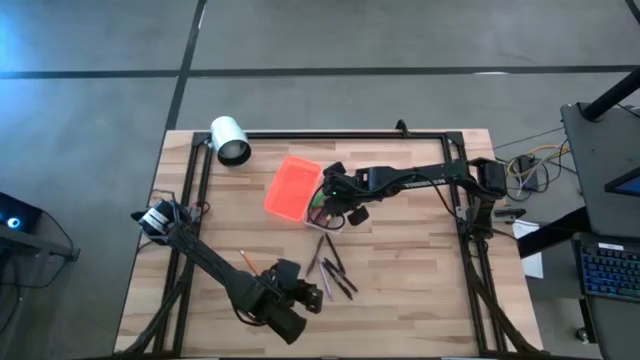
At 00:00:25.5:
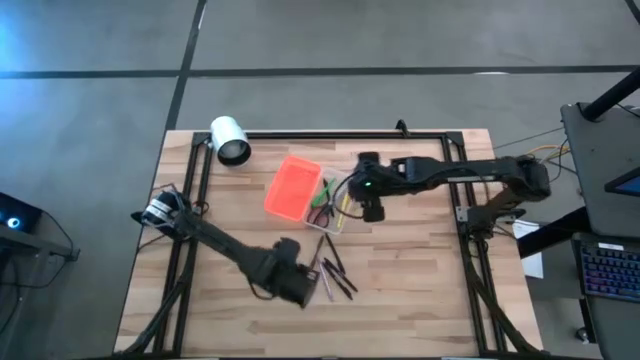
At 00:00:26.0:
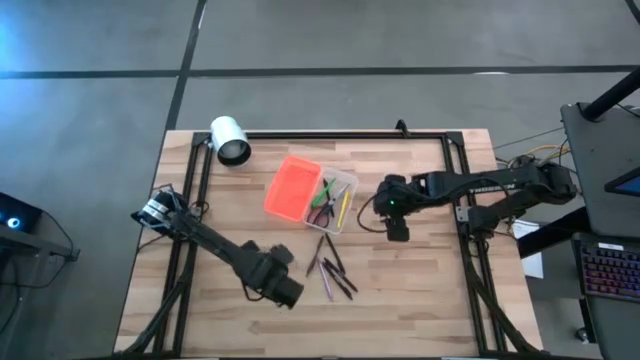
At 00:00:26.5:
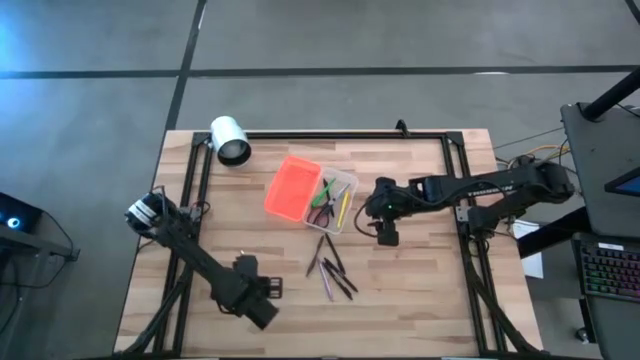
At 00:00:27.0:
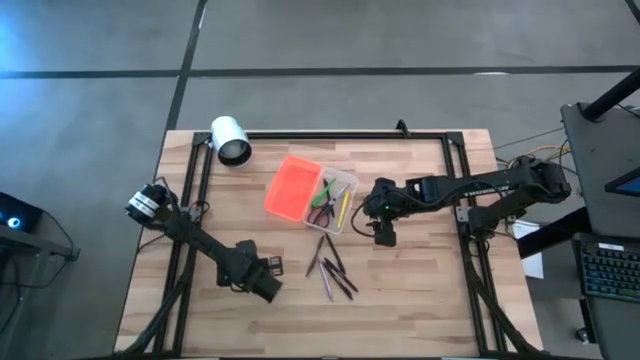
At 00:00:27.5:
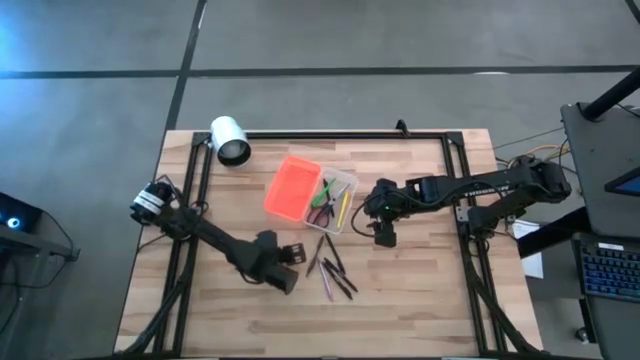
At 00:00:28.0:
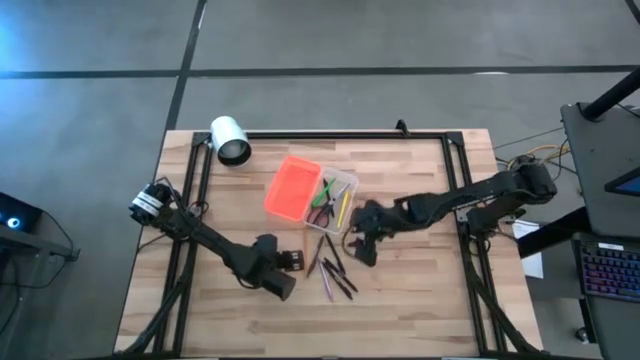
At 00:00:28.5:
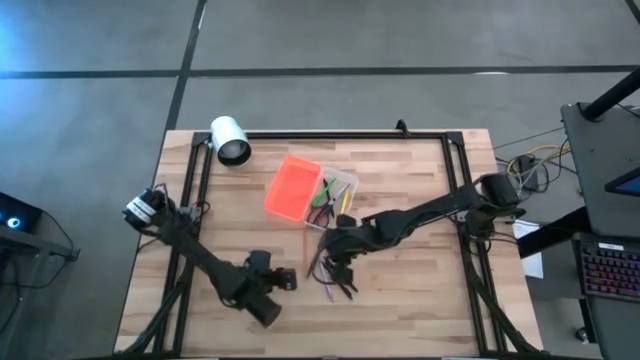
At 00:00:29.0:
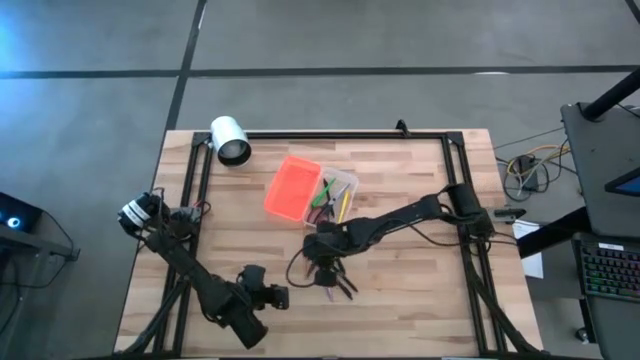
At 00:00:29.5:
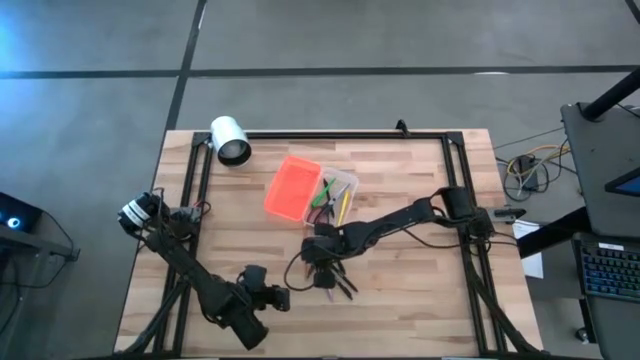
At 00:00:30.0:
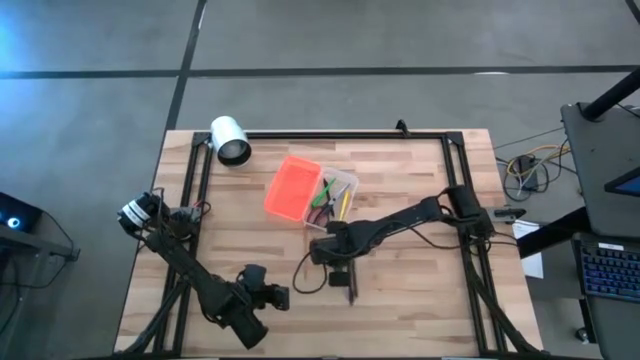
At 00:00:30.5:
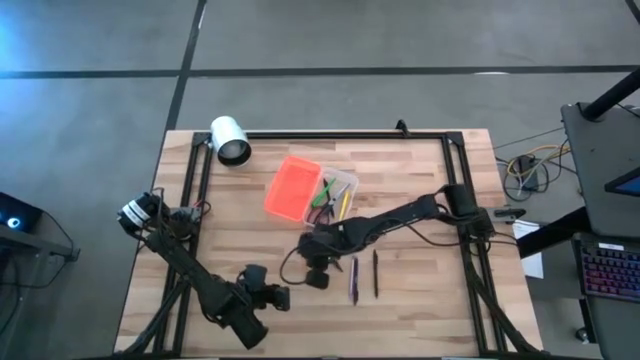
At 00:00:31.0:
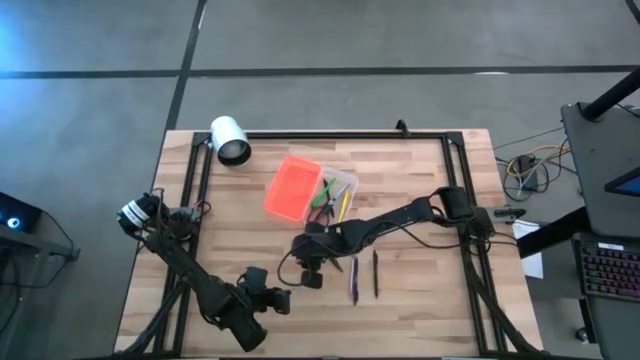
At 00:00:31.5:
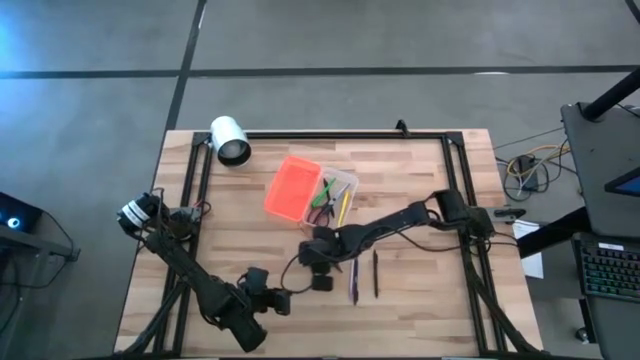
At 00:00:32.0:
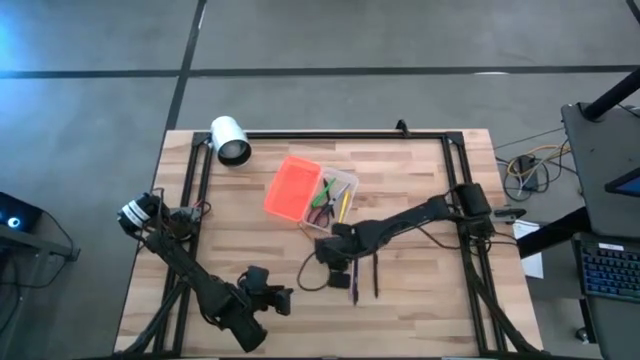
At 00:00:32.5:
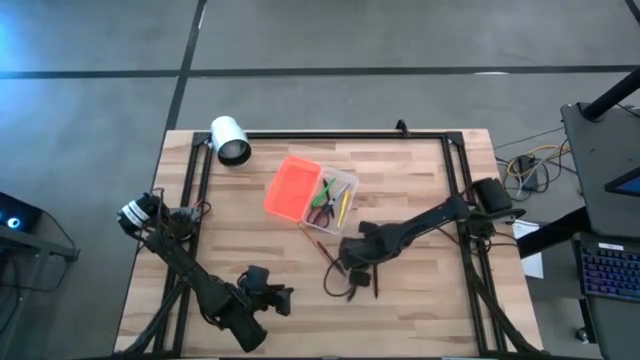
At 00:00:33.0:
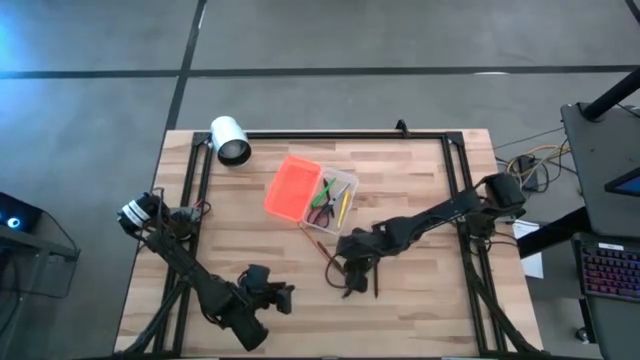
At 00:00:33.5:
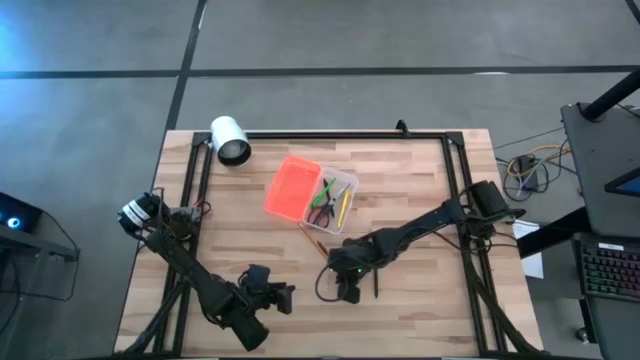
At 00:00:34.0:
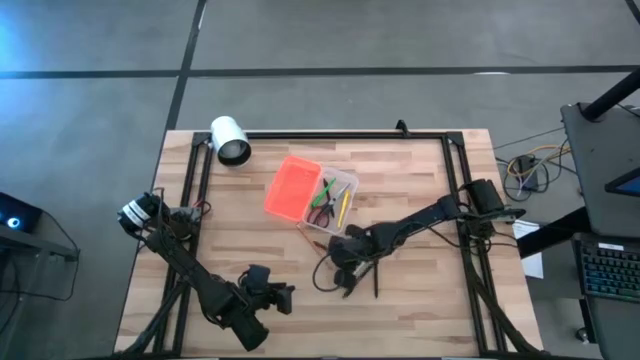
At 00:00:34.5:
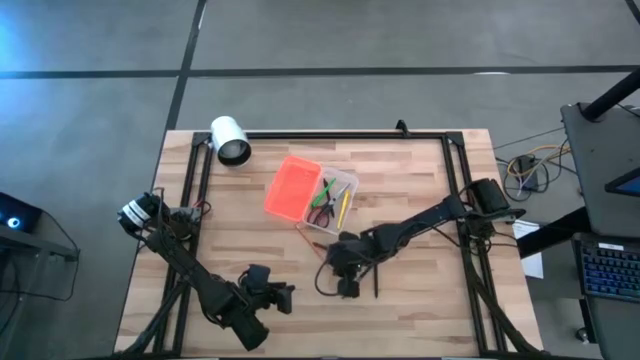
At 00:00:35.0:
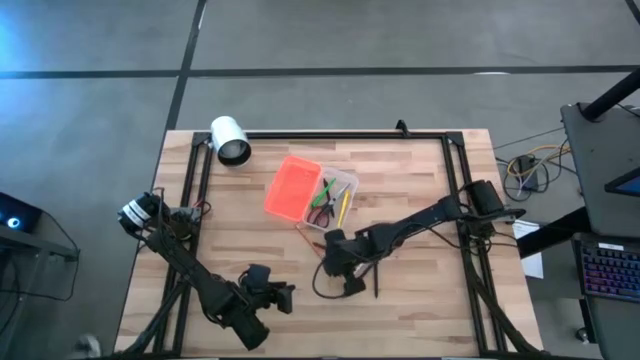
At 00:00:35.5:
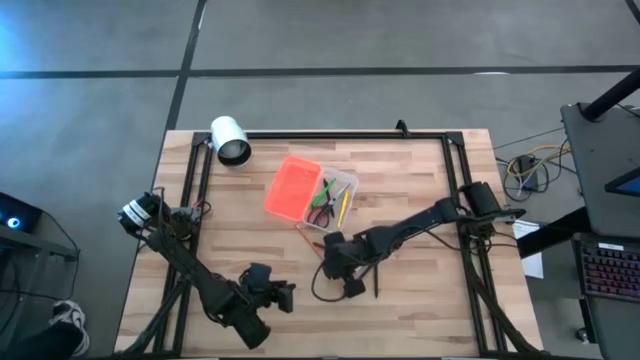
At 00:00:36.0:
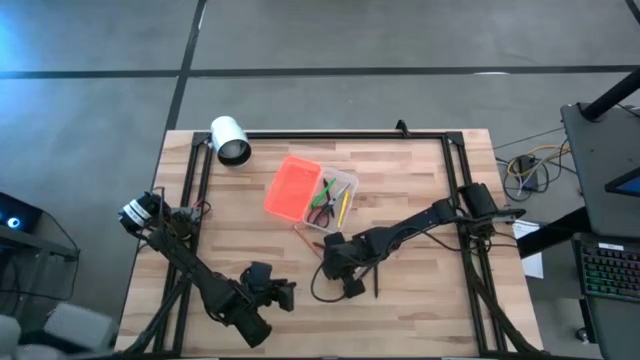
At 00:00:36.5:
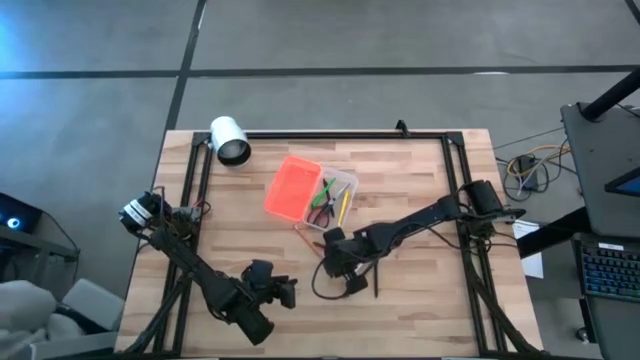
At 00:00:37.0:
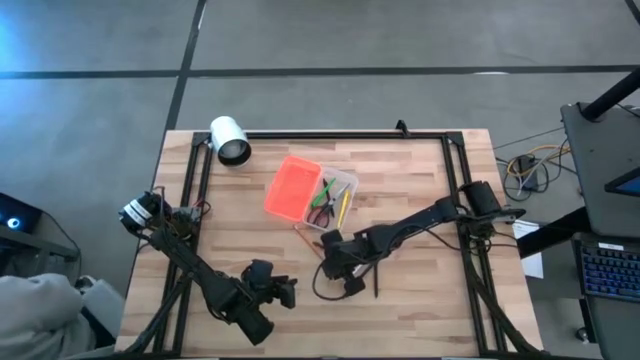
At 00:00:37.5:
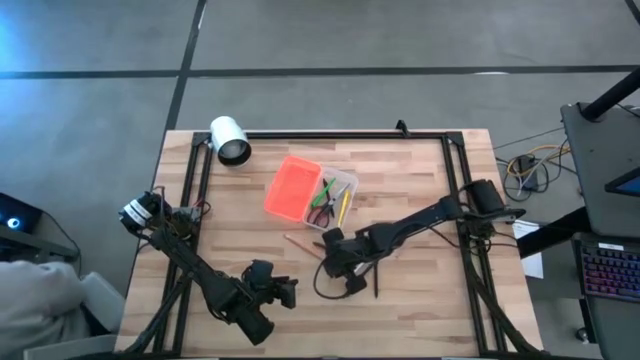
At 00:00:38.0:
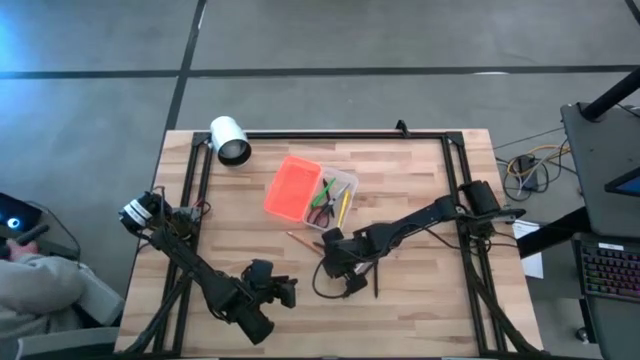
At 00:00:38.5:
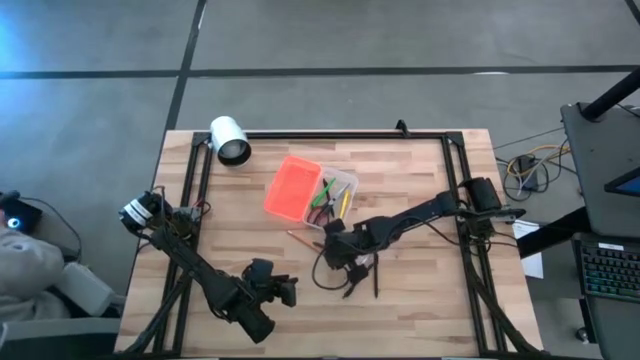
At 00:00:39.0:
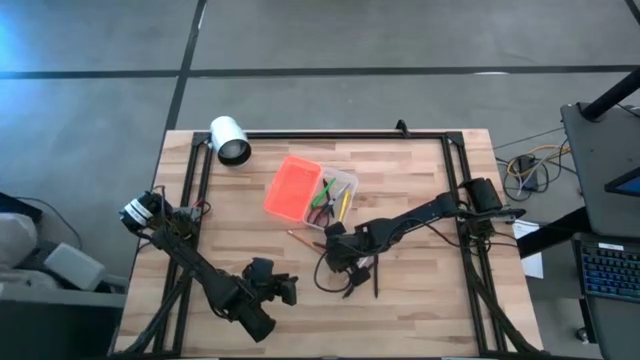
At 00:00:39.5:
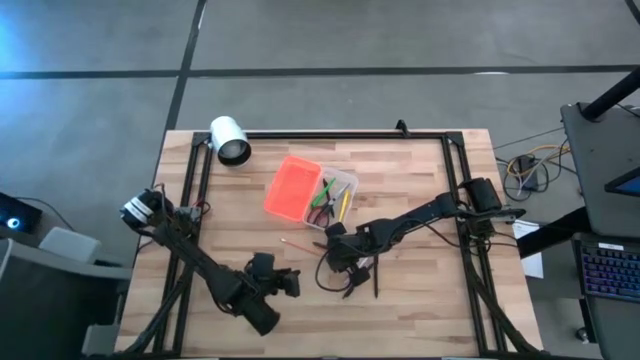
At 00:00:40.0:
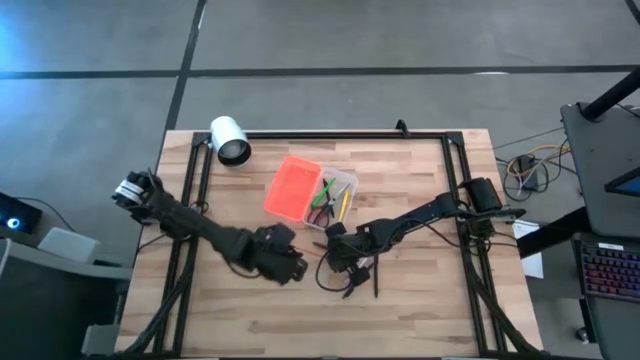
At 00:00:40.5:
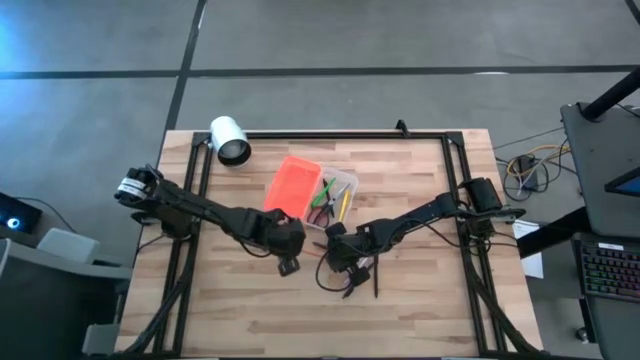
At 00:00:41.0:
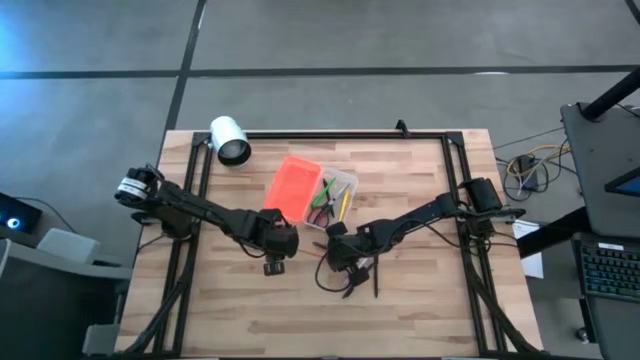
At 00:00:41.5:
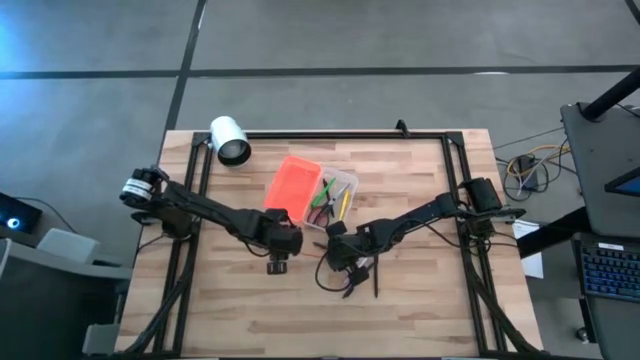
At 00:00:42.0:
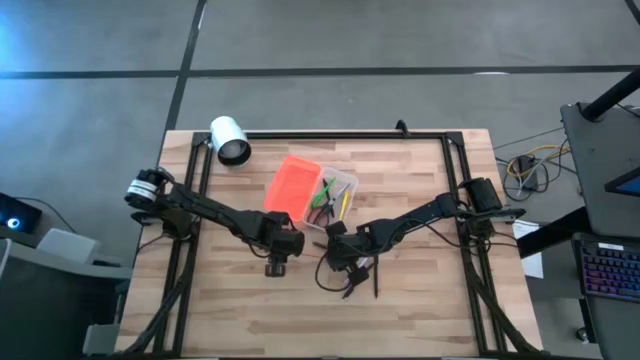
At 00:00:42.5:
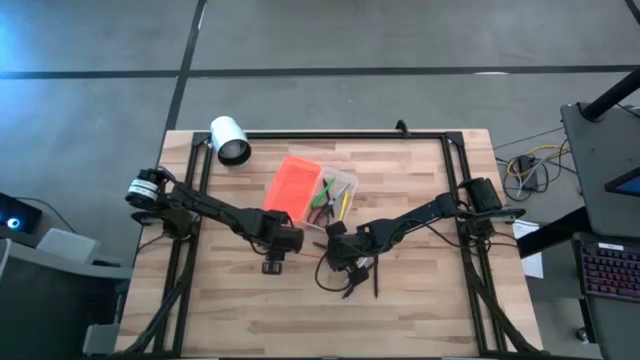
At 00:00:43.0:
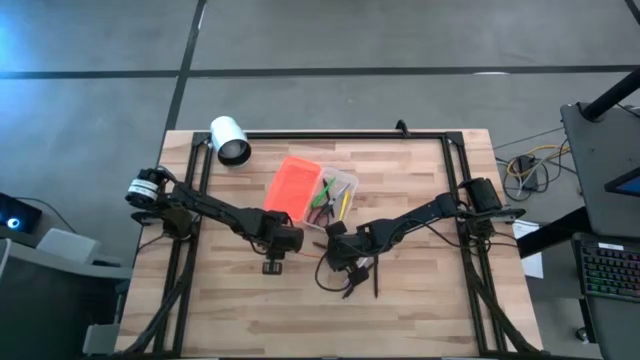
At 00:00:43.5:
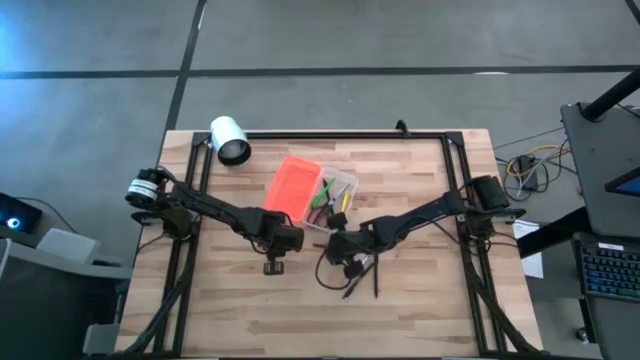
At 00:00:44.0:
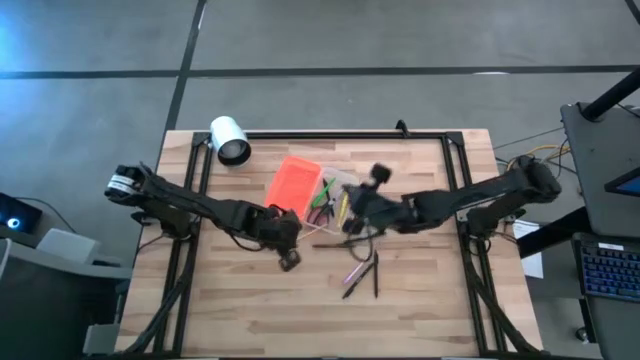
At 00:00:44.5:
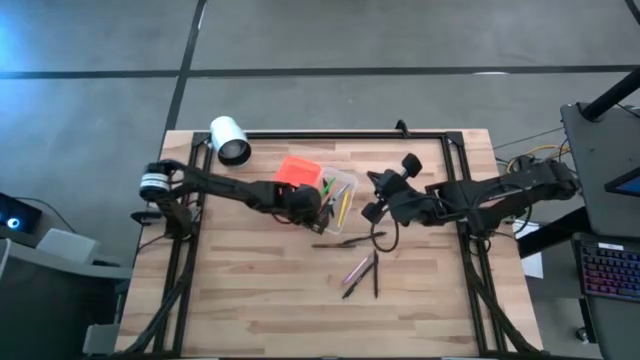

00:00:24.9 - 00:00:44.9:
Task: Pick & place school supplies into a supply box
Put the yellow pencil into the orange supply box

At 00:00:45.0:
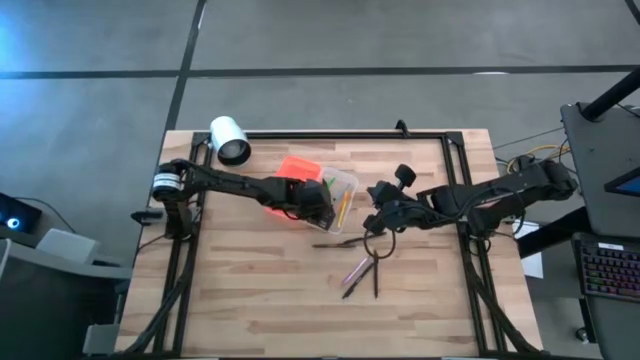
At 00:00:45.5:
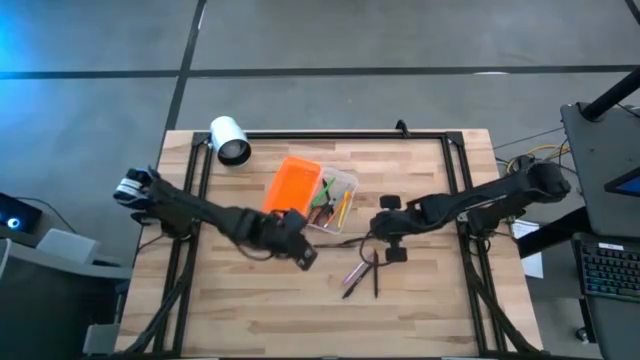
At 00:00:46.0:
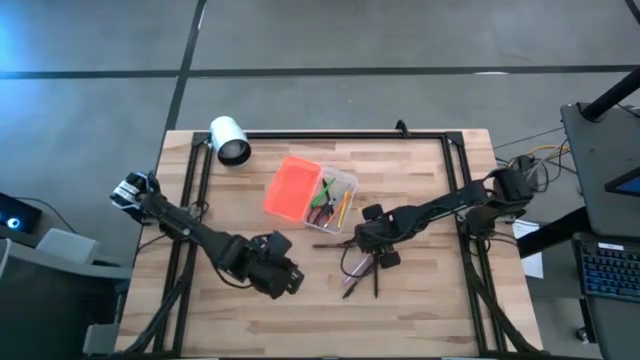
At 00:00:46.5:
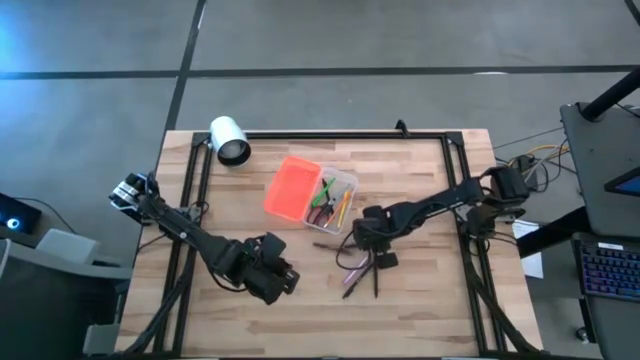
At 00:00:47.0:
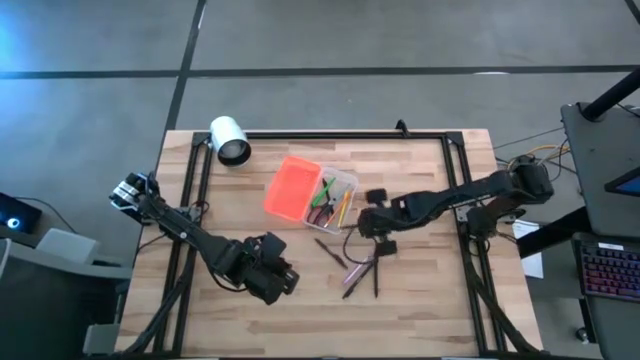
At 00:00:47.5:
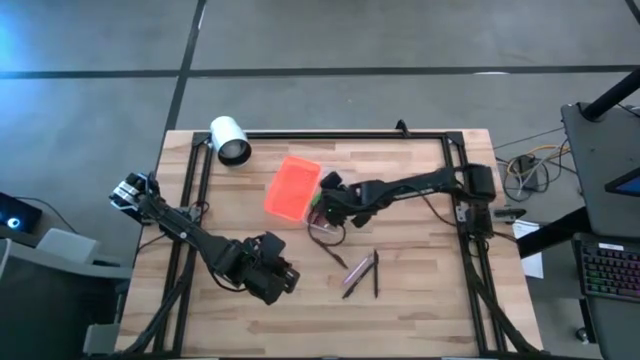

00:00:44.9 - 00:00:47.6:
Put the black pen into the orange supply box
